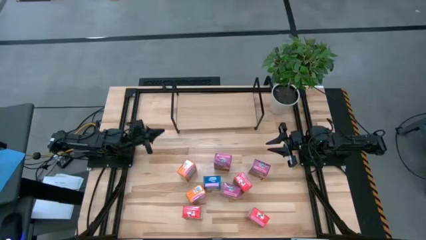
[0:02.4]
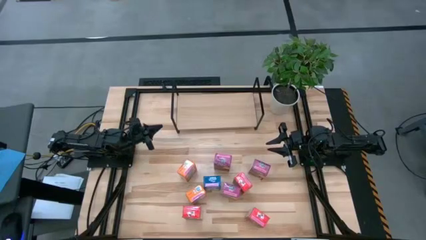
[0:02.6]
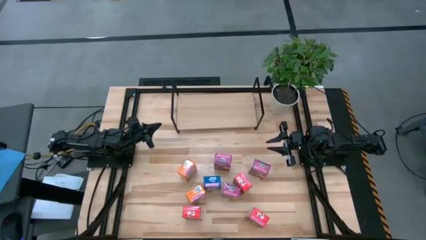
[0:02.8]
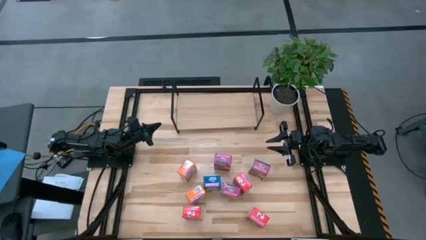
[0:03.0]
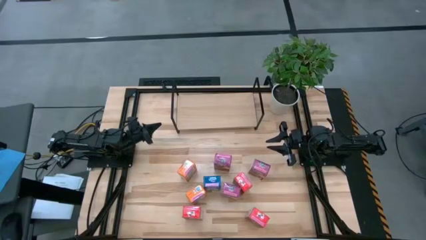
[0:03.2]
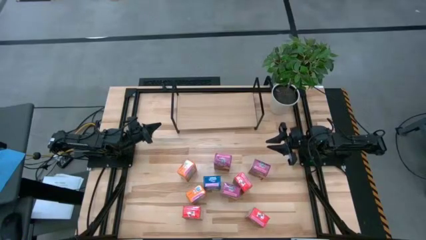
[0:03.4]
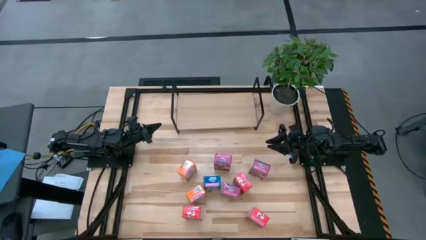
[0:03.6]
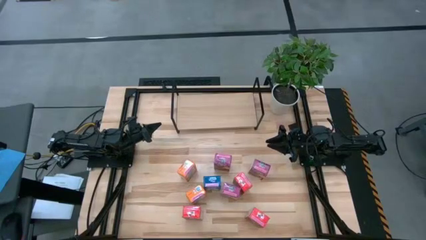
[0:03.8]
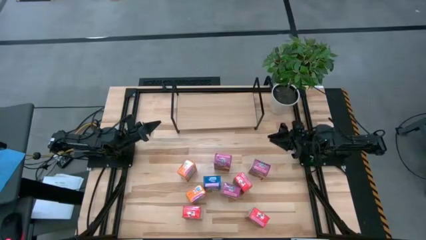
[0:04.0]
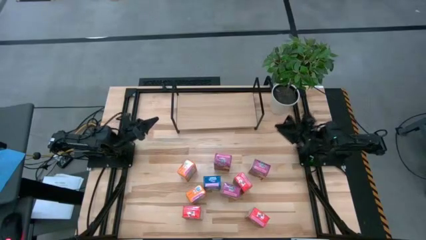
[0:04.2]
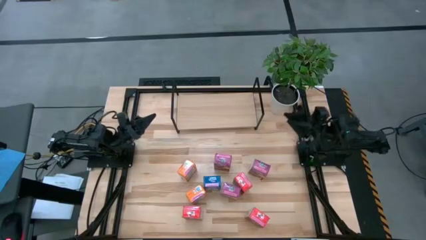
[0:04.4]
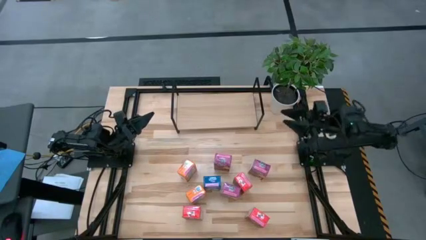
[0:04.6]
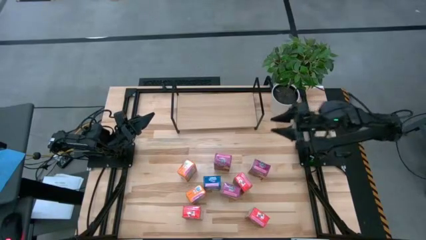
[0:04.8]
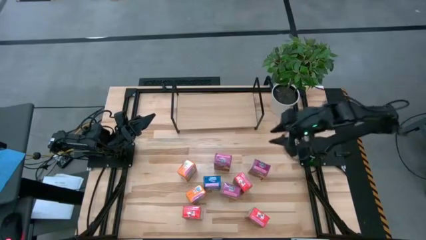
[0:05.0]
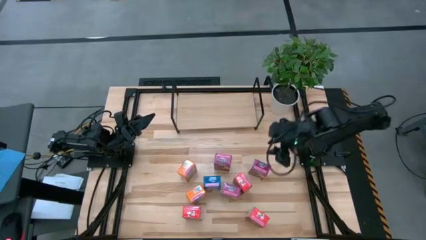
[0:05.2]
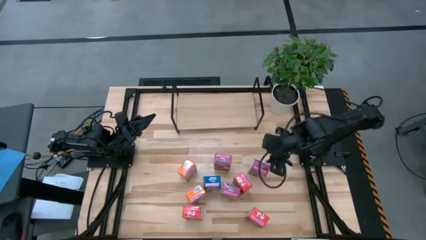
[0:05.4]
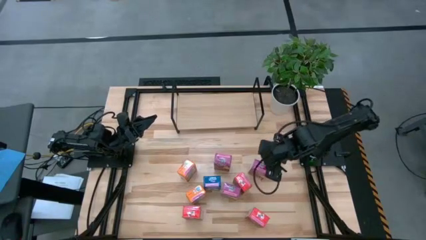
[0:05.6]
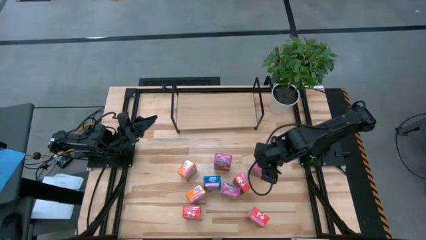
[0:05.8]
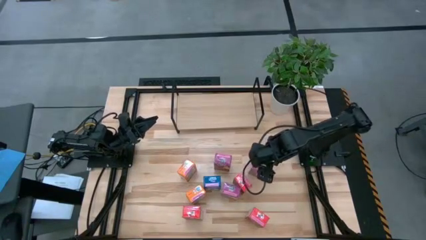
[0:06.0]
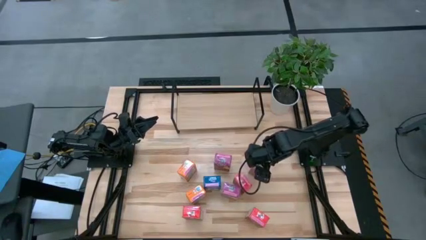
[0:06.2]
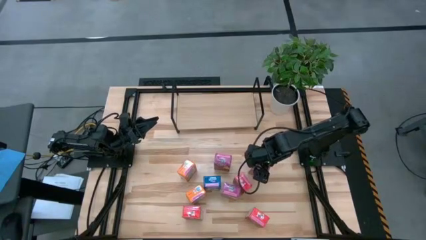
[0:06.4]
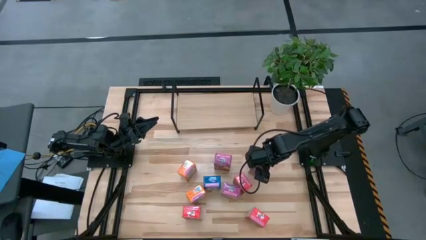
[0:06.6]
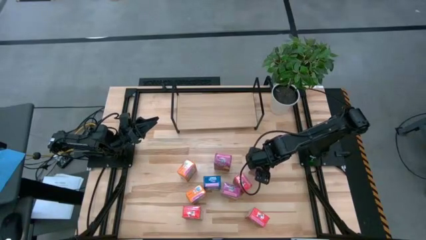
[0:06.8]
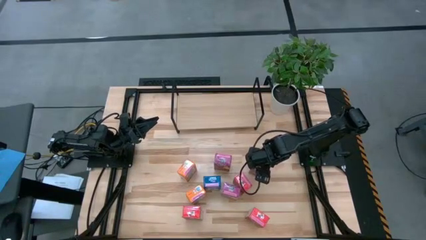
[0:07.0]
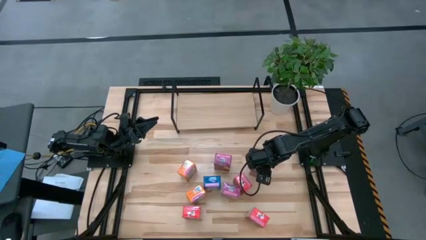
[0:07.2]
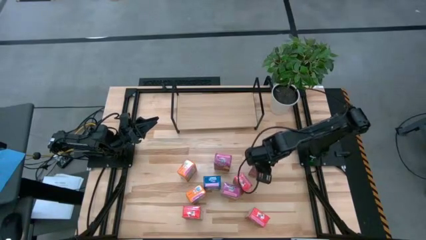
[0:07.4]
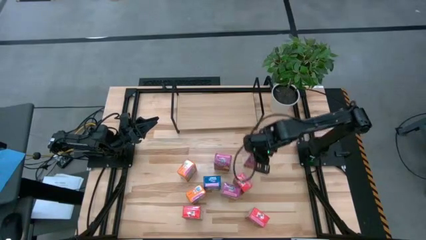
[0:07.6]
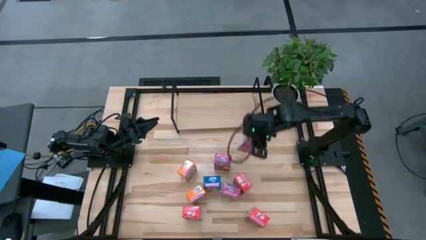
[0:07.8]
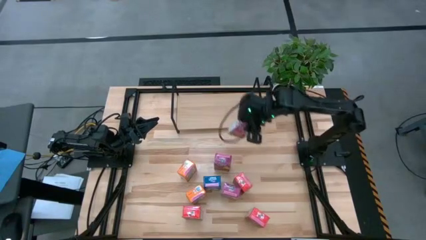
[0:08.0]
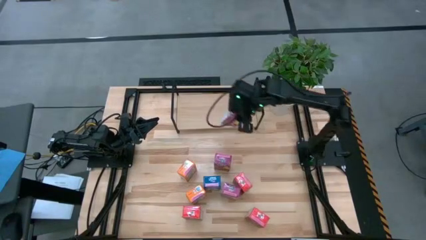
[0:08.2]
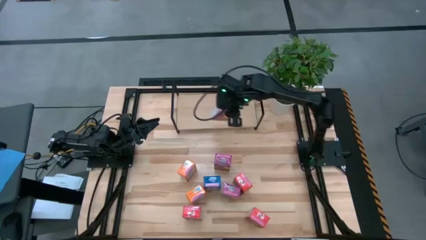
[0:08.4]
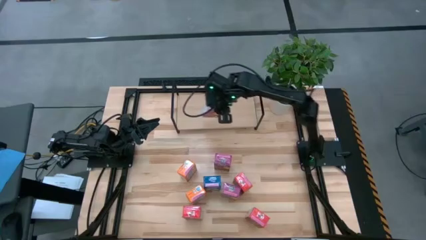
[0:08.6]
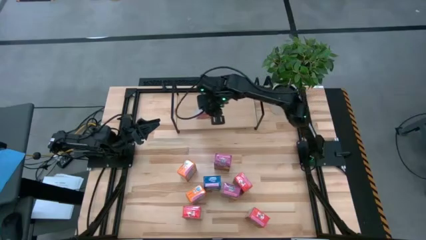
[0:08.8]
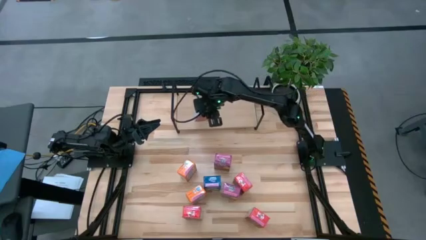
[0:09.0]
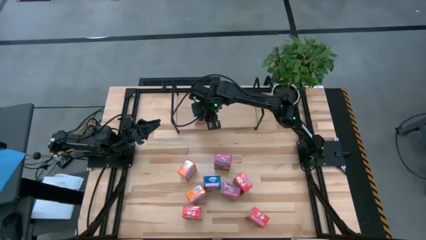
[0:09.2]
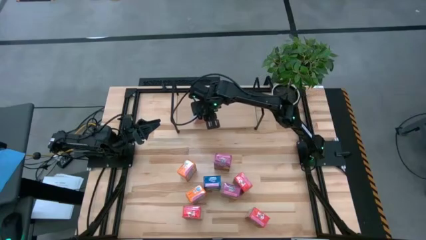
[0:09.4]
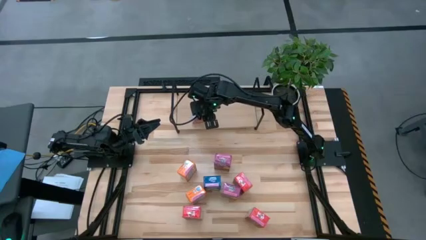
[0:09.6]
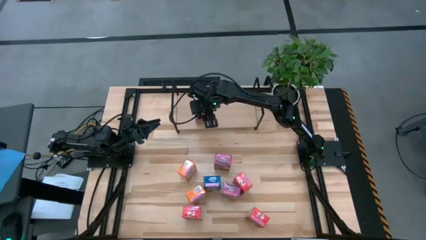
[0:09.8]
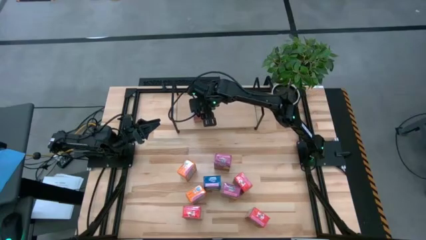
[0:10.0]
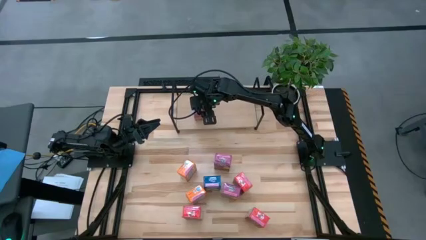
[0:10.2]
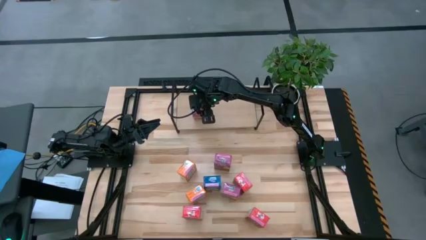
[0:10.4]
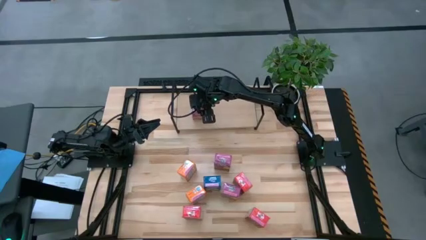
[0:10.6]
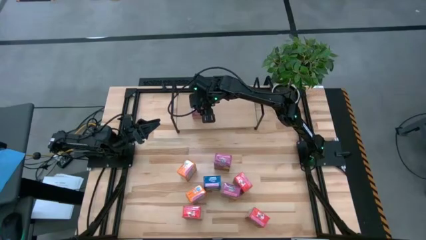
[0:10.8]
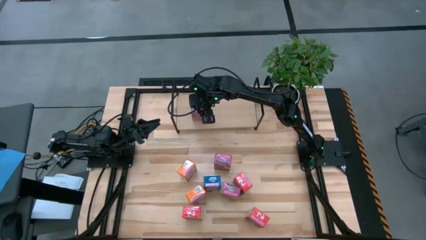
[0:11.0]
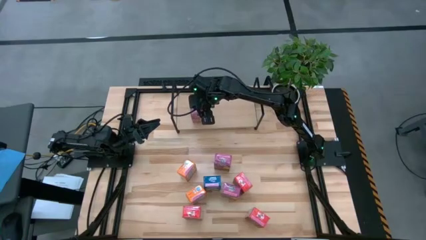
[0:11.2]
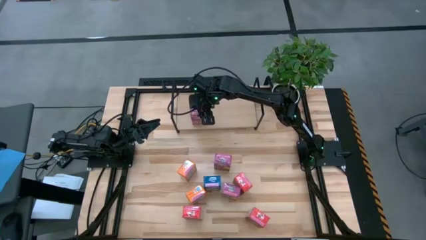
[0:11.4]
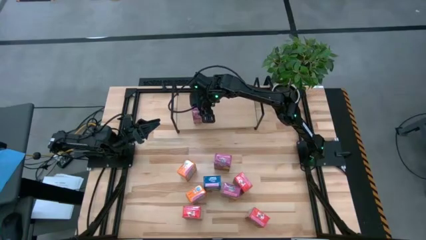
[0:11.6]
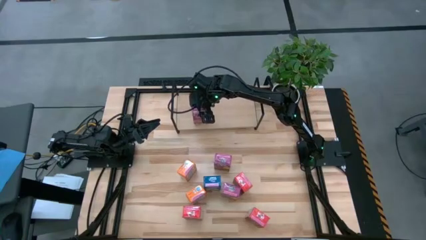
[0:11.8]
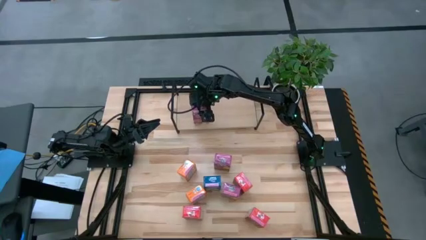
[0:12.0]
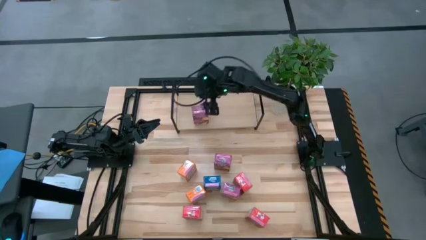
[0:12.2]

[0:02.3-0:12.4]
Task: Stack cereal on shelf
Put the top right purple cereal box on the shelf
